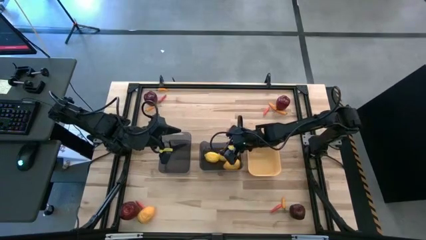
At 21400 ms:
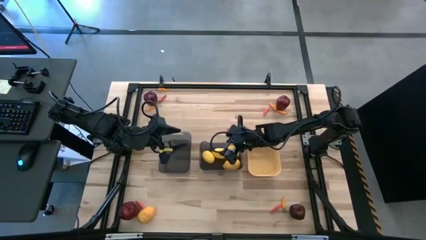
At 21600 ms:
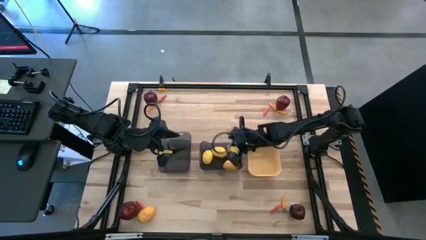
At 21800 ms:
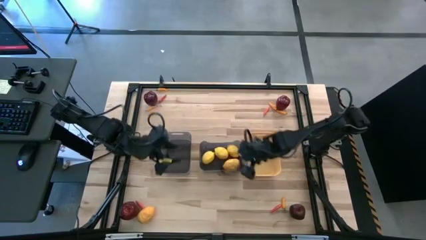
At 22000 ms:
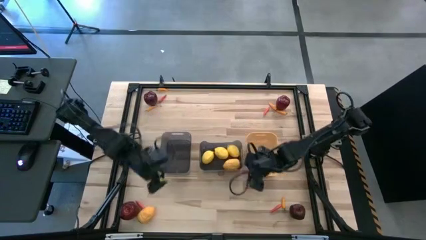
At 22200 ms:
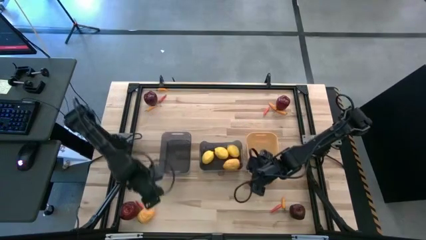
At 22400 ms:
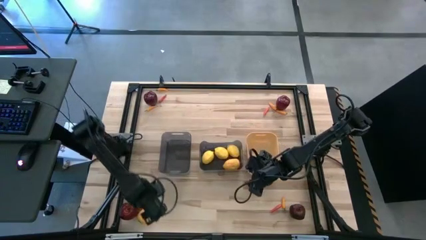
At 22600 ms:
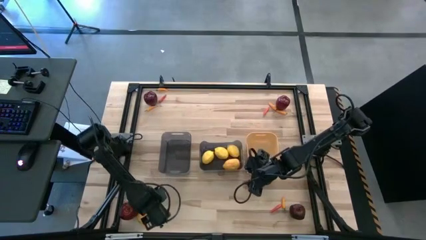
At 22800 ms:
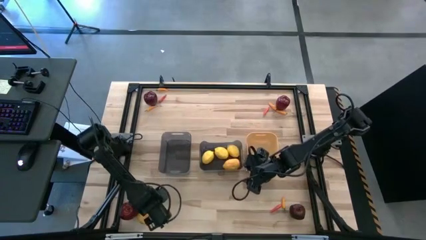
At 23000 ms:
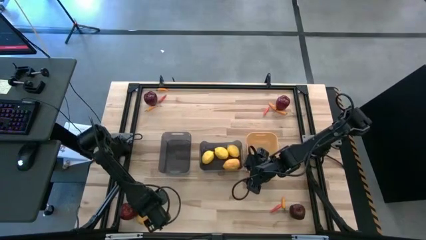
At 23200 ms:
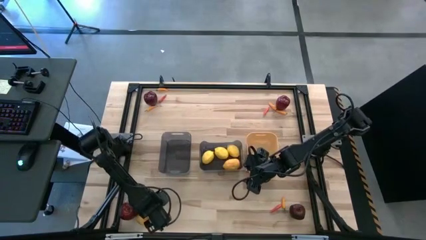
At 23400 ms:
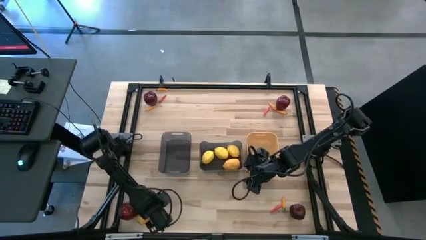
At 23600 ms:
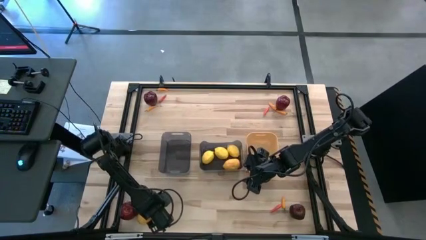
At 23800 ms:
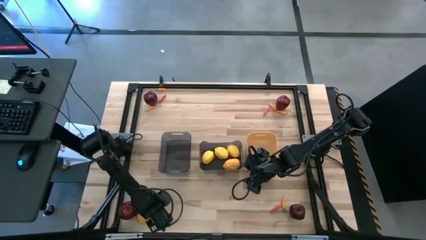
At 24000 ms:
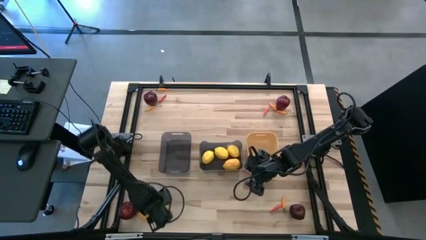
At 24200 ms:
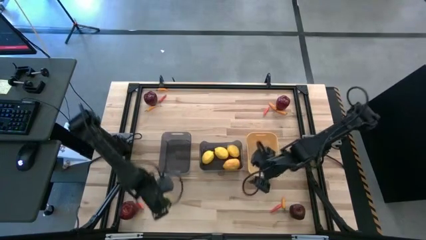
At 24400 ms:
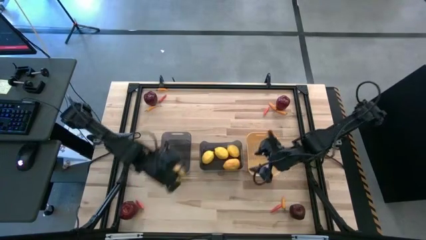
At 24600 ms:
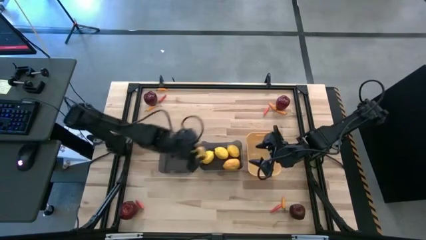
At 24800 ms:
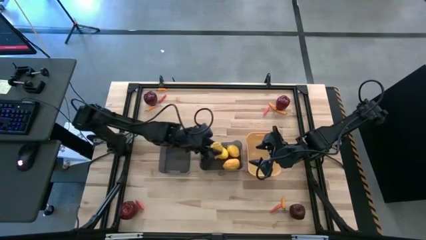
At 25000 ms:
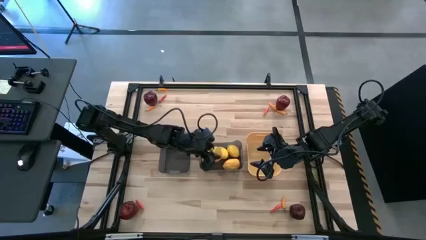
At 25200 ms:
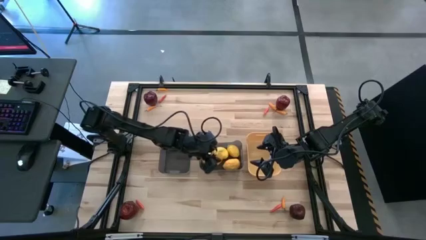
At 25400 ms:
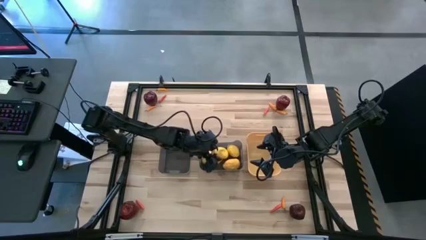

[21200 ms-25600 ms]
Task: Sort produce into baskets
Put the lemon into the right black bin

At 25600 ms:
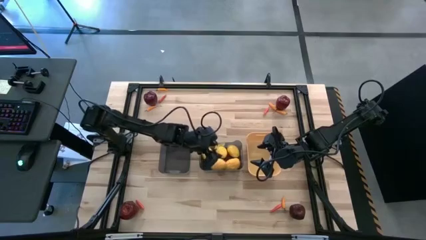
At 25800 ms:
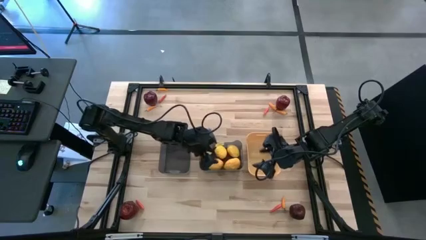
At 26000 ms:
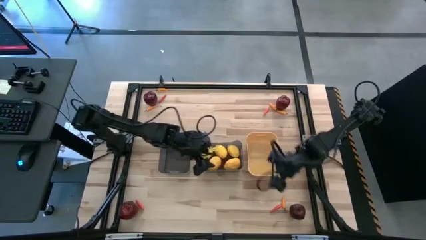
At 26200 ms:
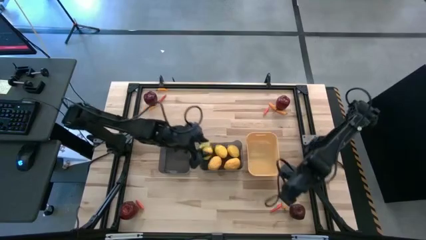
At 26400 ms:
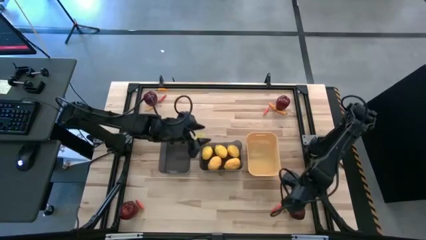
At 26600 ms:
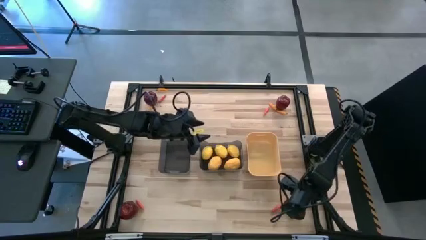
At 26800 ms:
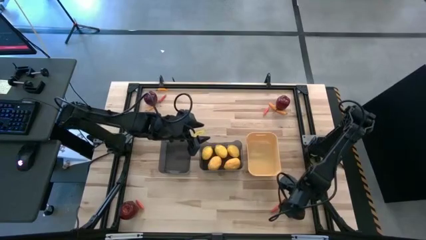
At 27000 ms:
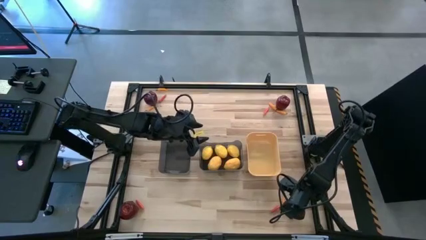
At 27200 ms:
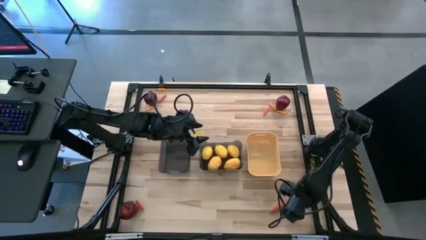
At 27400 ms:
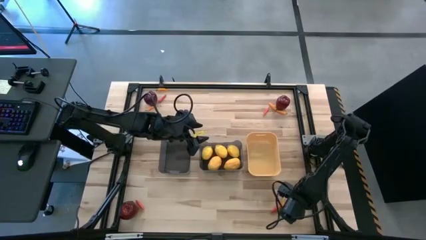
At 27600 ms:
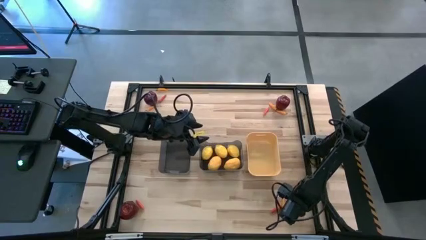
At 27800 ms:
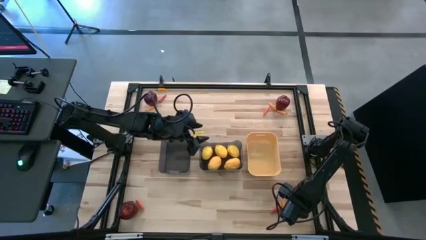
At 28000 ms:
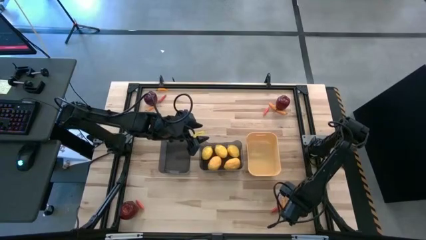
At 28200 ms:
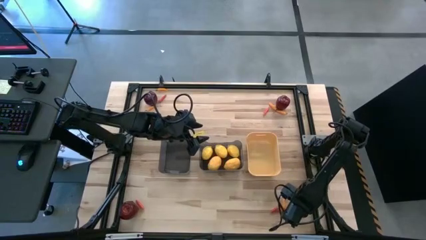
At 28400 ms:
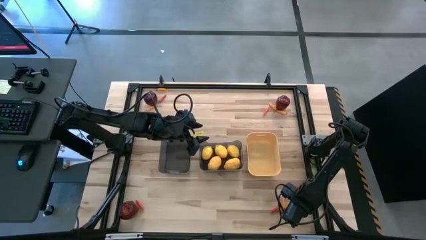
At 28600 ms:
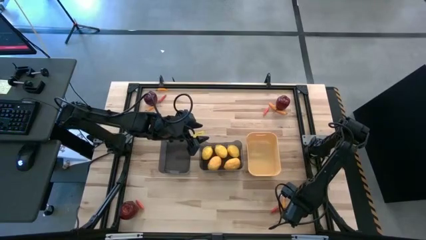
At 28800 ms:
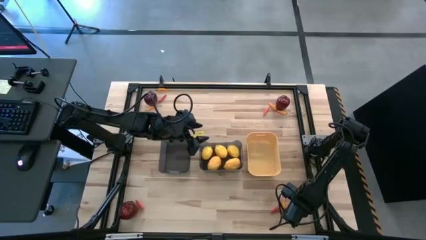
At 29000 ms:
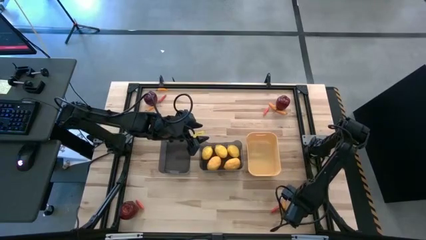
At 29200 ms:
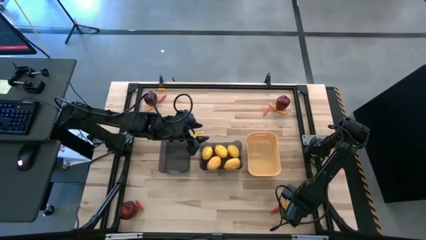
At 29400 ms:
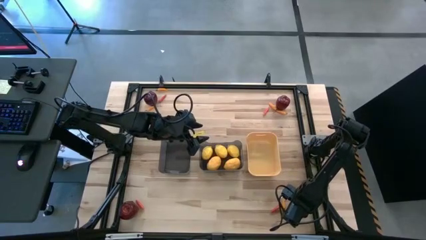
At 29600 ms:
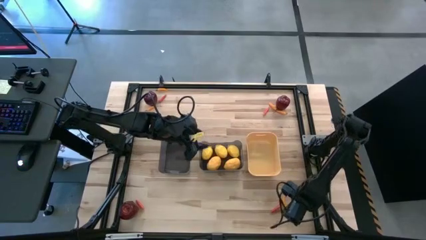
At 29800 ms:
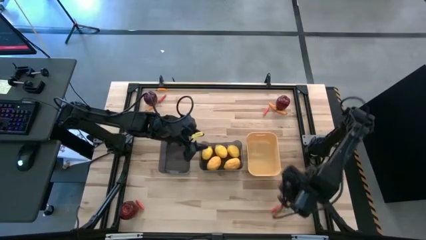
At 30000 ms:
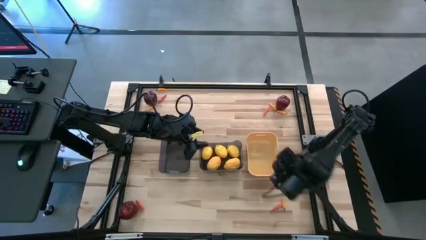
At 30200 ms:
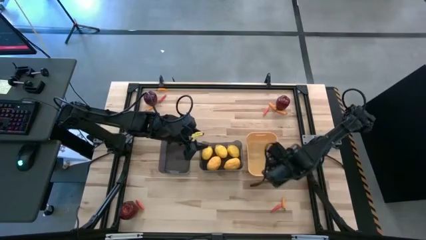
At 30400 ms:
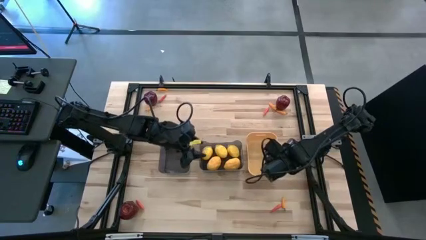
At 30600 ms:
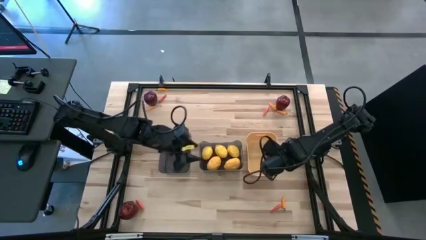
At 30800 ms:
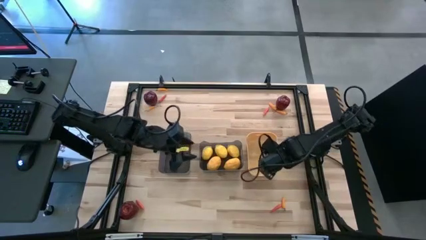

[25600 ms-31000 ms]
Put the apple into the yellow bin

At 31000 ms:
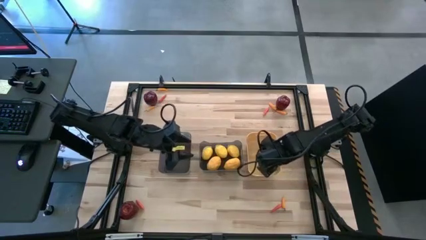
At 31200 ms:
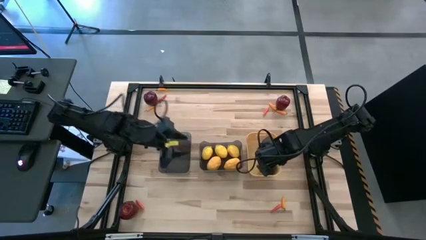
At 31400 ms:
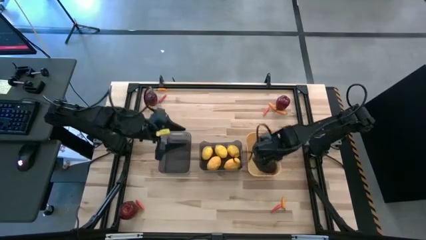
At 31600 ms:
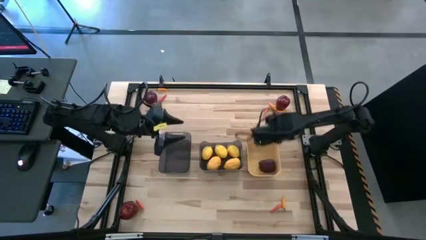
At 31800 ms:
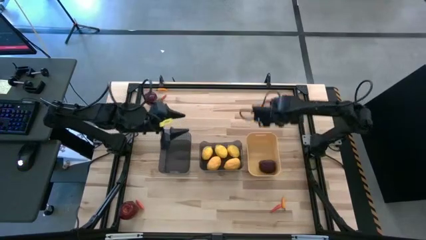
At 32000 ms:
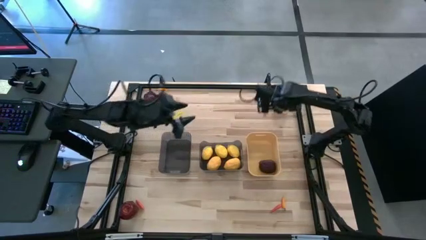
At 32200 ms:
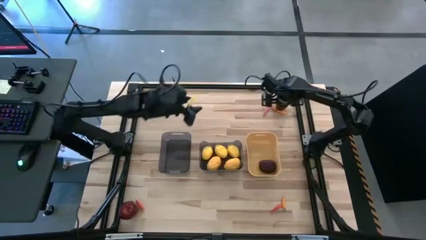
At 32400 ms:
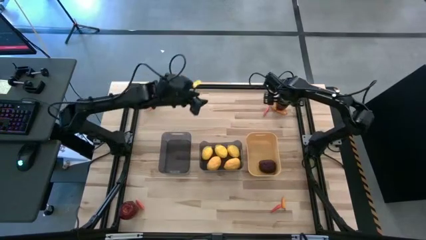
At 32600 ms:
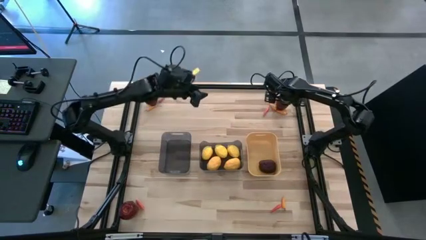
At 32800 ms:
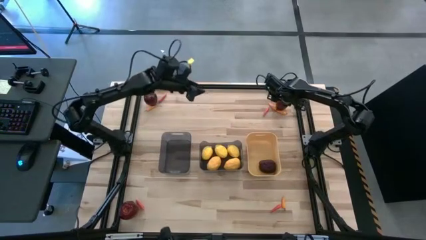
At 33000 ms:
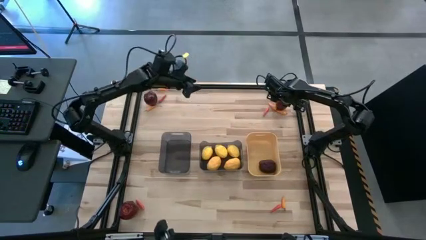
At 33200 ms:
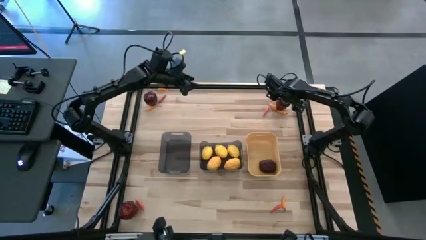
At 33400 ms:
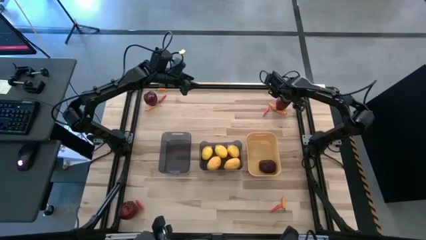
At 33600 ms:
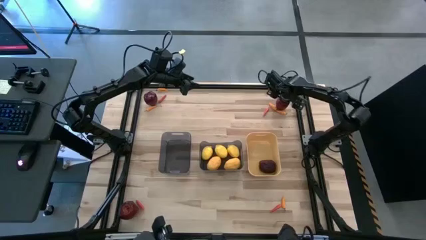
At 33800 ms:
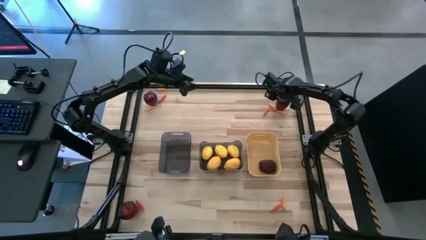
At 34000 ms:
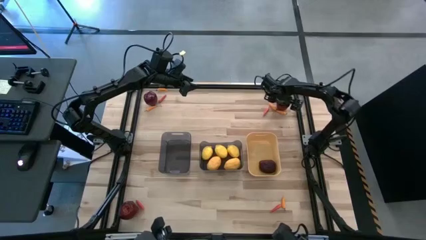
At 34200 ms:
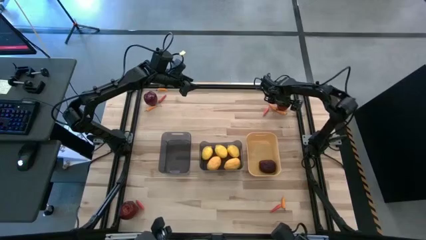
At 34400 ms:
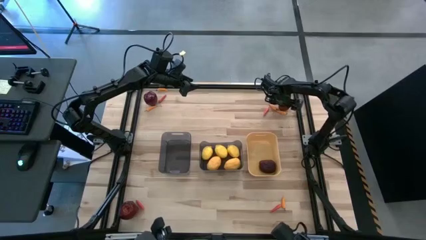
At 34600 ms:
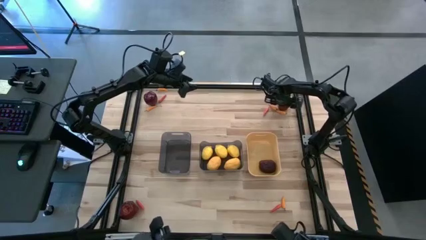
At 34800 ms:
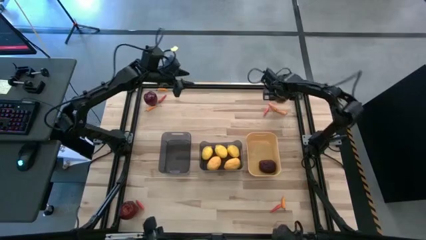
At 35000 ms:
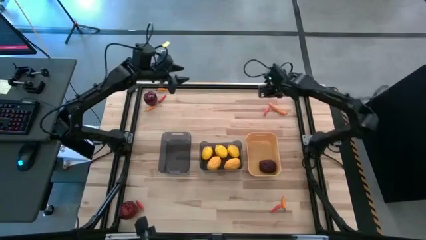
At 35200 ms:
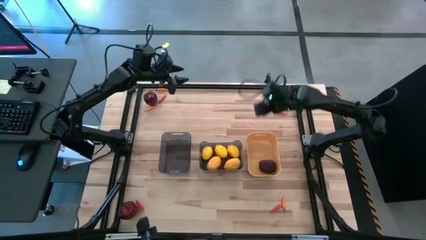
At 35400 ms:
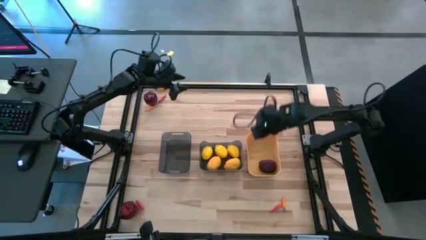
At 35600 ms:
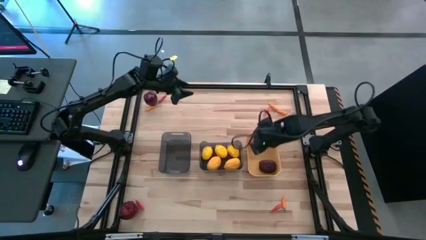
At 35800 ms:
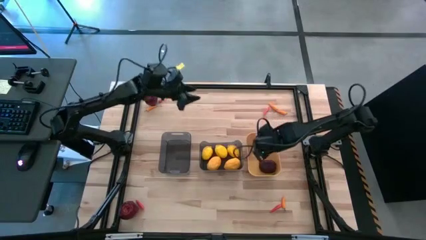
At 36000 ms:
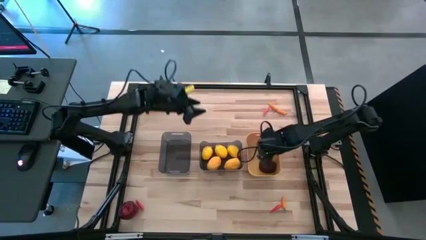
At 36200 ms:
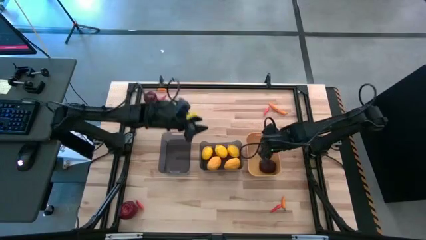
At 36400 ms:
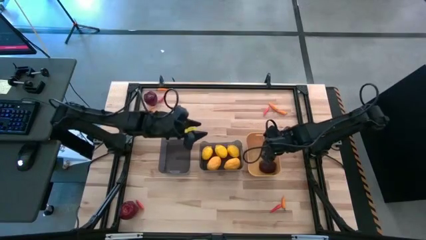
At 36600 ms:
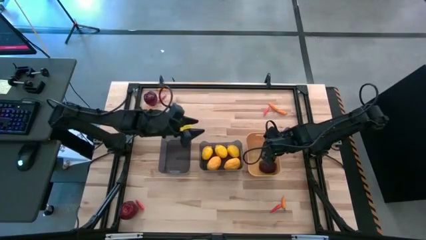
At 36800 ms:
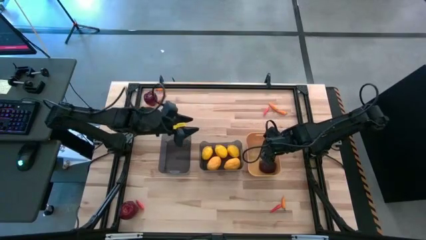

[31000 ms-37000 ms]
Put the apple into the yellow bin
